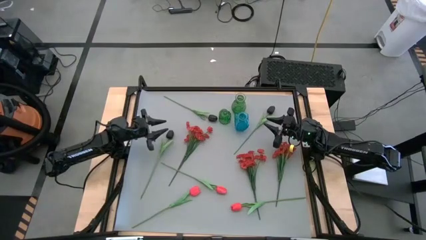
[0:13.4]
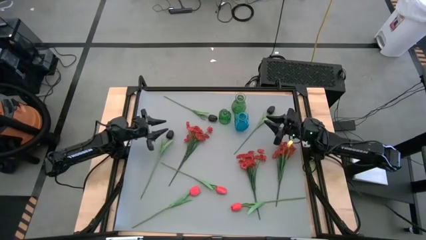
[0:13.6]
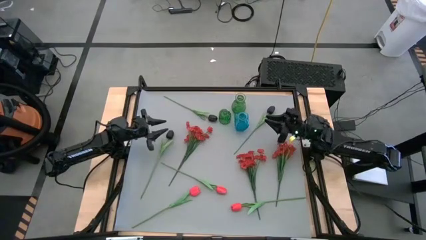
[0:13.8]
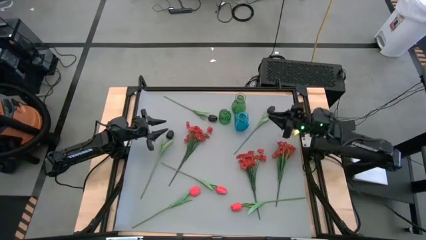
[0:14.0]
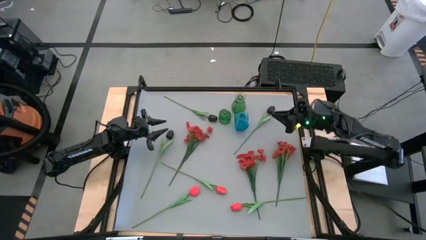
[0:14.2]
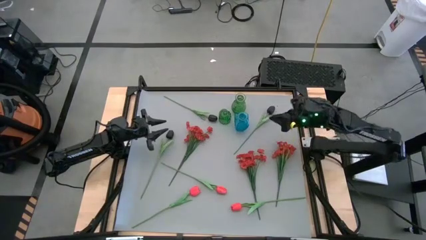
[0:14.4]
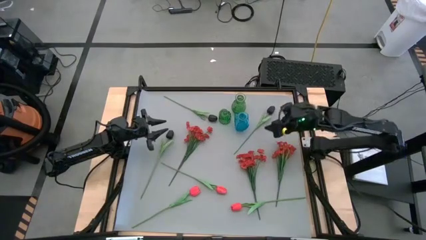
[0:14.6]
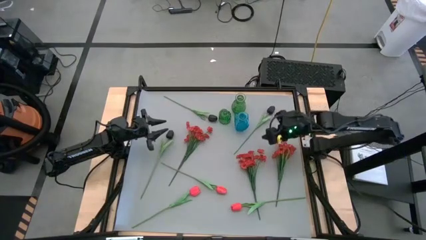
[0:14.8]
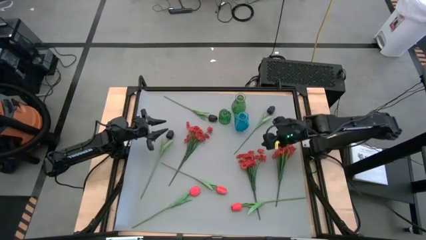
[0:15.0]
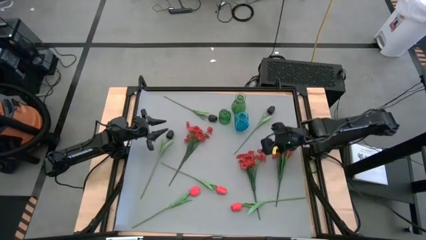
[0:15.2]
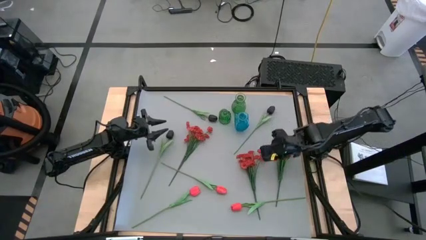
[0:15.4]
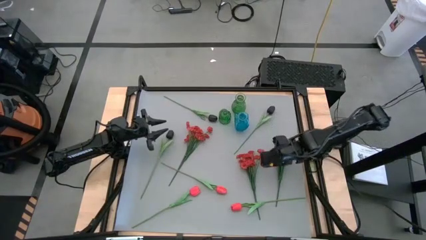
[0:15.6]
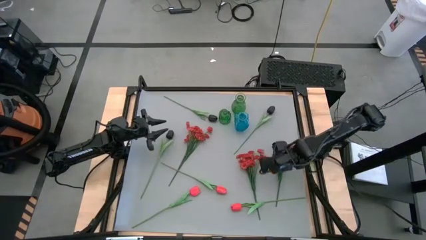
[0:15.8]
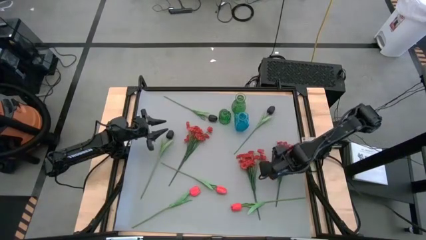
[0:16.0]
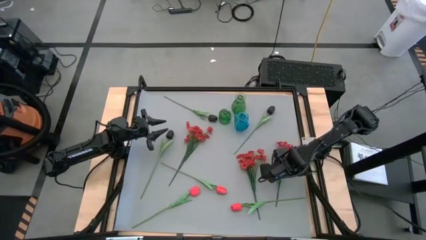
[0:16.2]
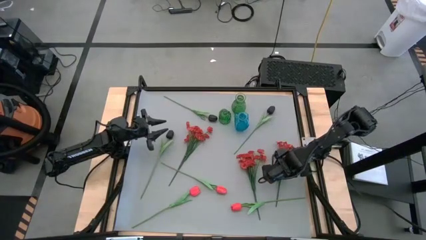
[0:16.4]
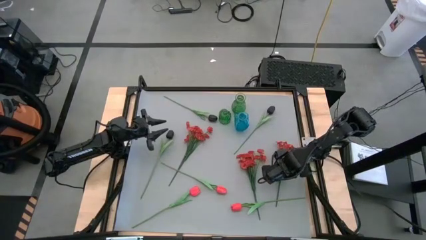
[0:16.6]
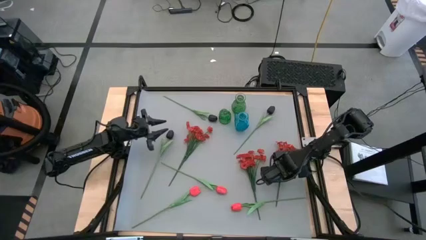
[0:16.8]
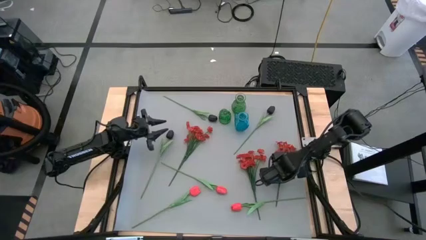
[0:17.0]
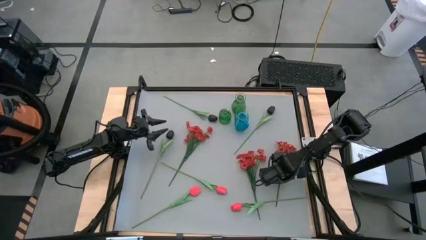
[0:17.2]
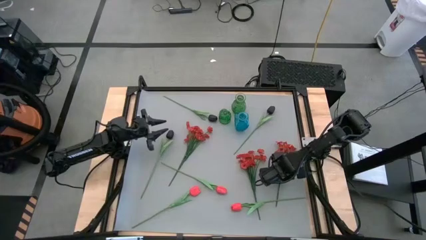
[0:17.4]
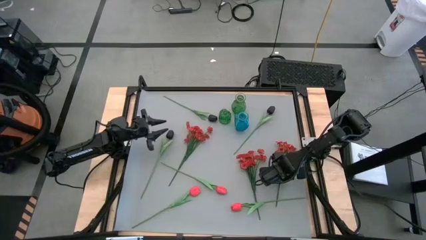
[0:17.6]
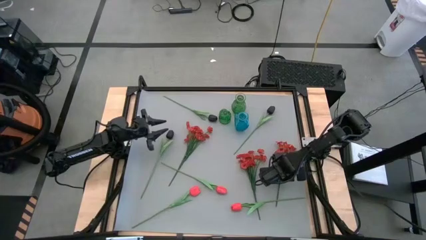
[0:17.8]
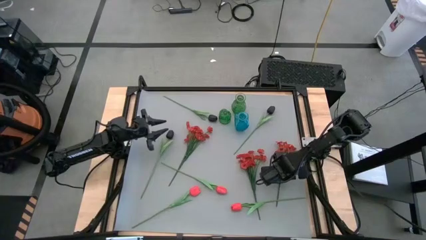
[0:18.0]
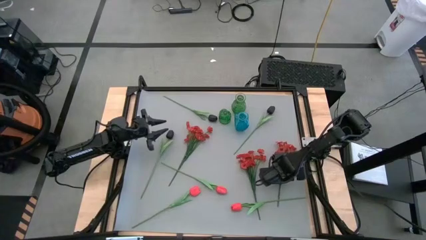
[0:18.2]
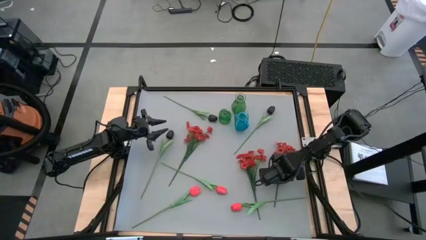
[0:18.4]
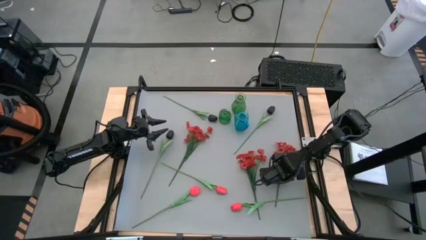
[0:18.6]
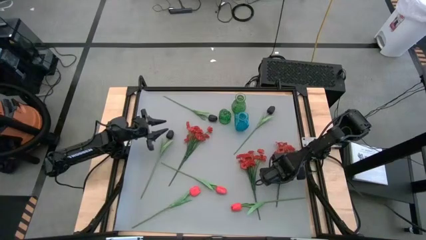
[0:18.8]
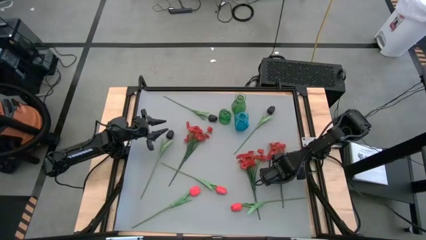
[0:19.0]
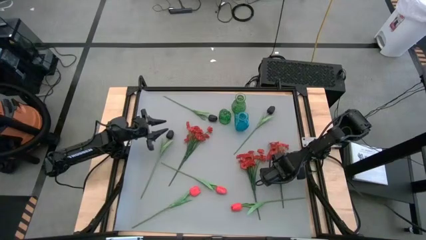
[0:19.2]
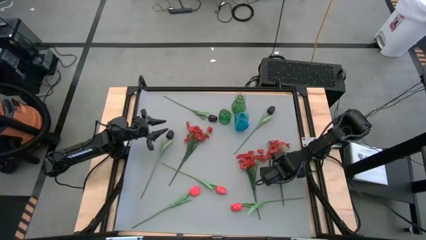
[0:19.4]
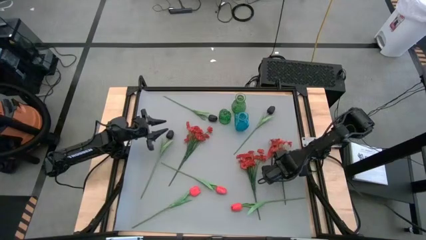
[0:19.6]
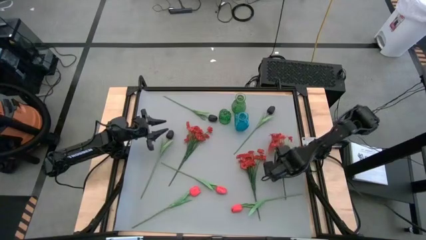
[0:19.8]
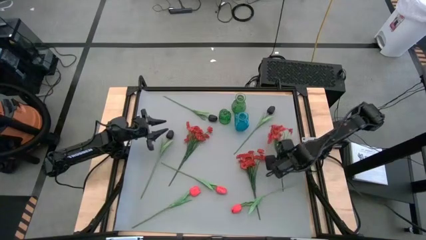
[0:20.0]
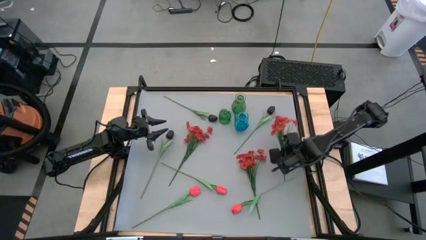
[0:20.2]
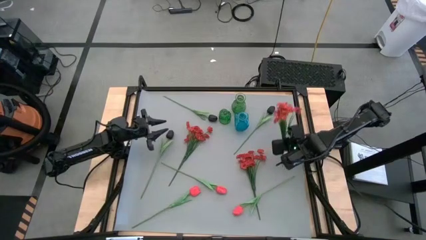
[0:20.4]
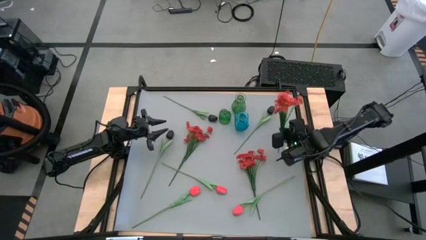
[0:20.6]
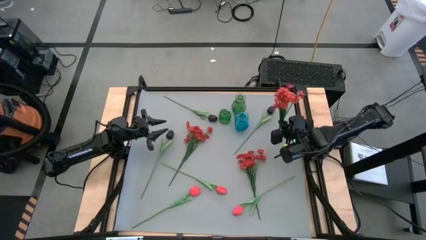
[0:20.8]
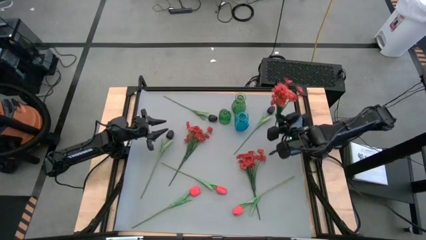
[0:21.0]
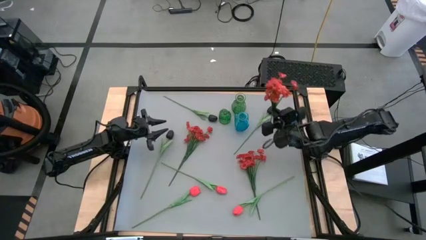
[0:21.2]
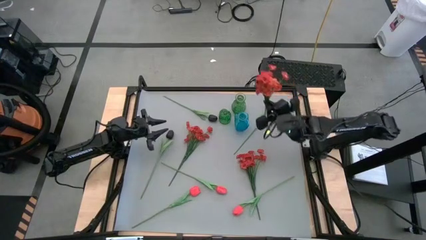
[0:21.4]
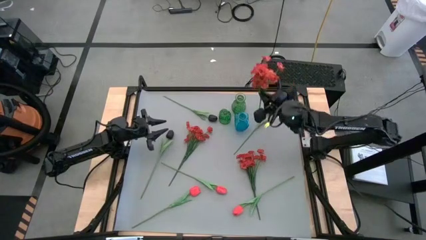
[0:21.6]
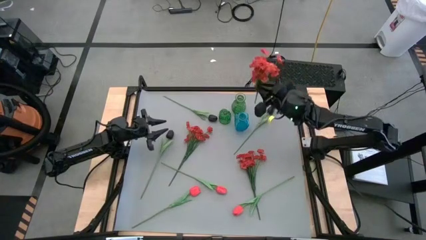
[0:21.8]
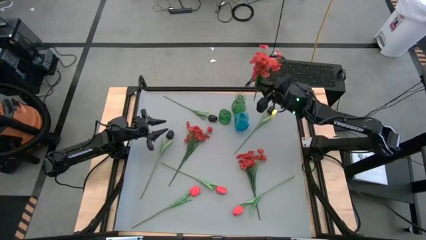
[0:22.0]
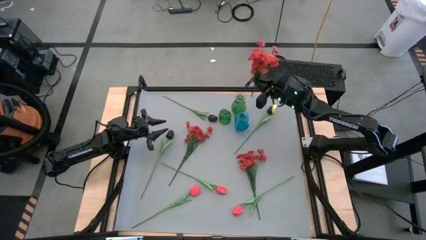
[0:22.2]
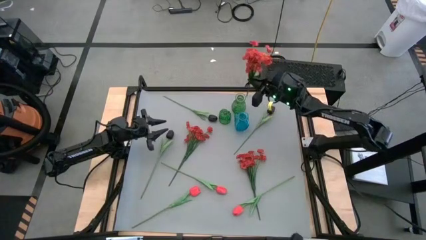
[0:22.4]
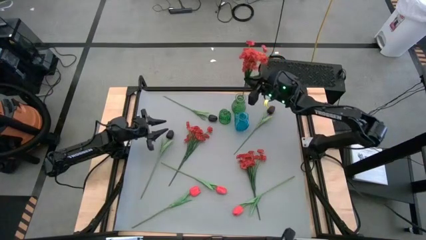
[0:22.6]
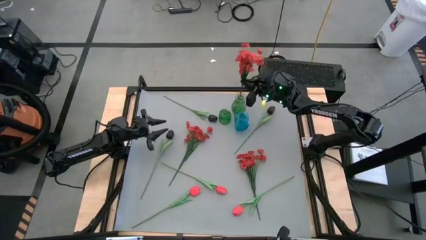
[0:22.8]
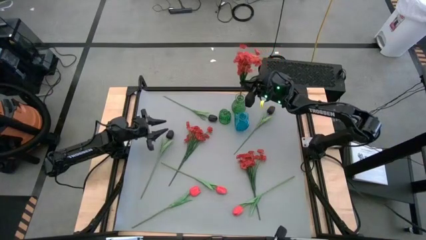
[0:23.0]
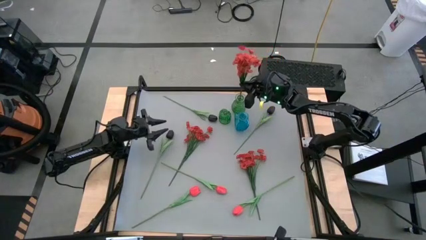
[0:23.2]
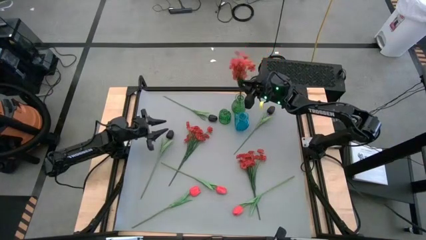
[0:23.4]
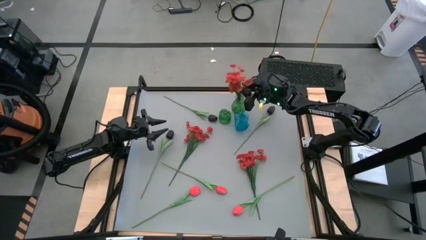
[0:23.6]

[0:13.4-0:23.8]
Task: Sort flowers into vase by color
Put the right red flowers into the top green vase

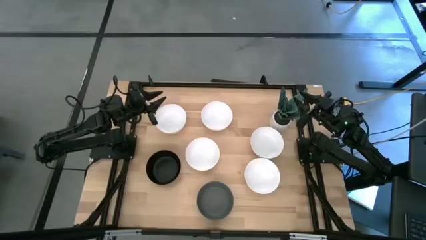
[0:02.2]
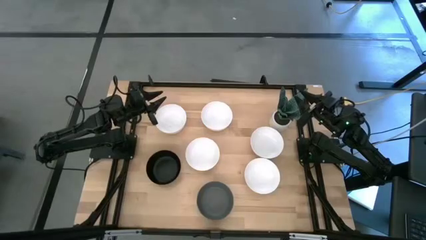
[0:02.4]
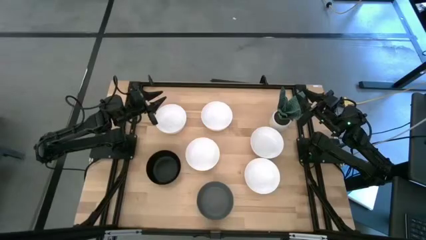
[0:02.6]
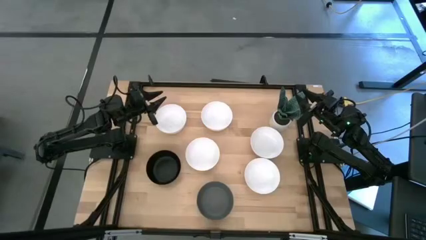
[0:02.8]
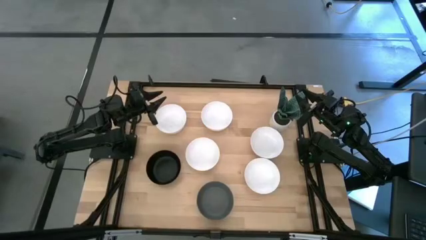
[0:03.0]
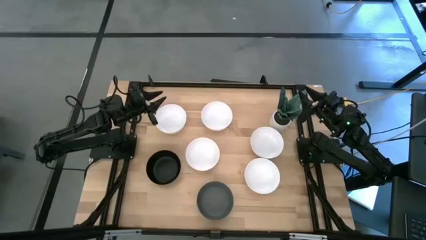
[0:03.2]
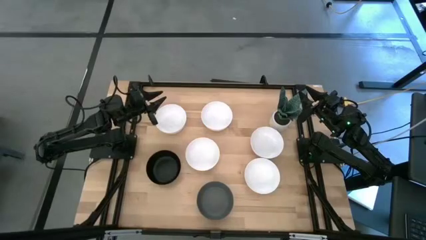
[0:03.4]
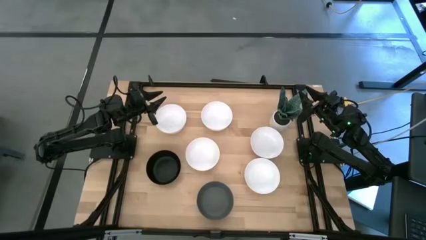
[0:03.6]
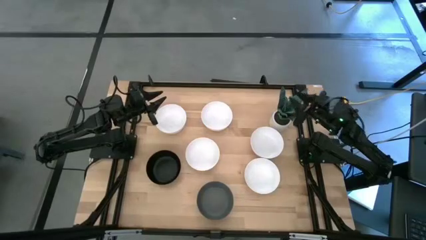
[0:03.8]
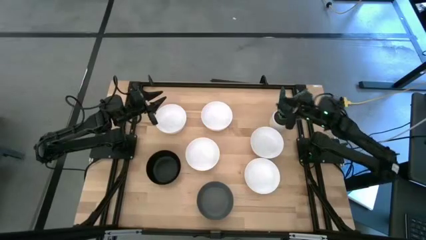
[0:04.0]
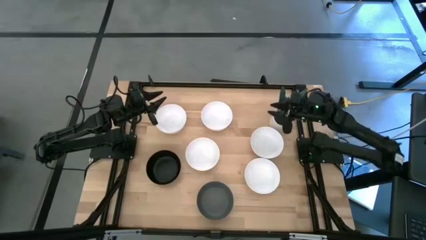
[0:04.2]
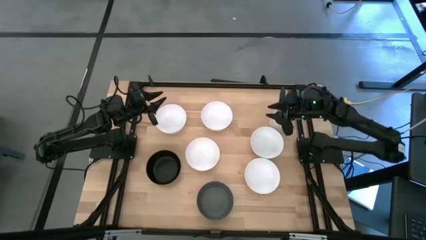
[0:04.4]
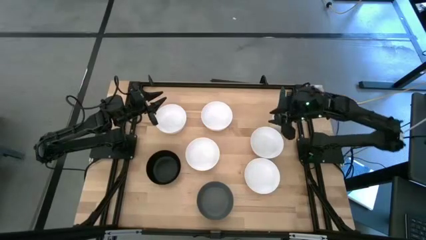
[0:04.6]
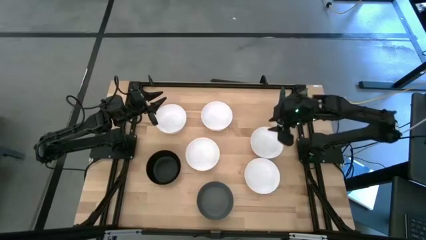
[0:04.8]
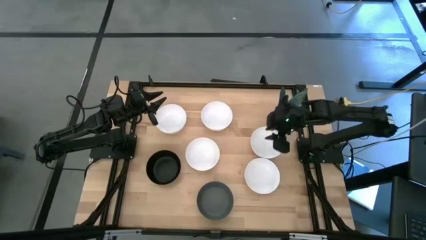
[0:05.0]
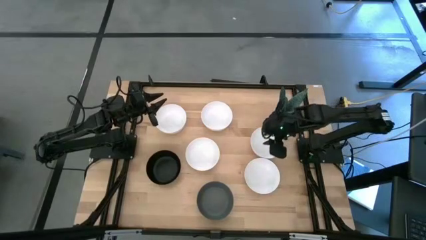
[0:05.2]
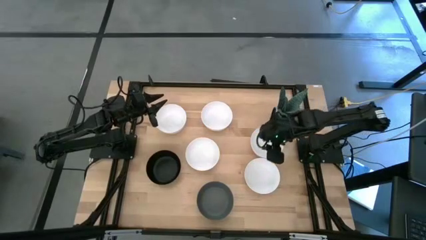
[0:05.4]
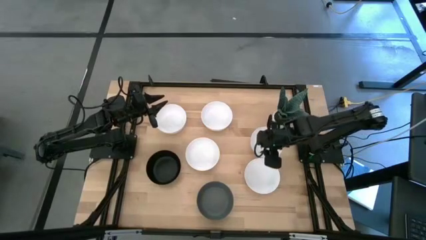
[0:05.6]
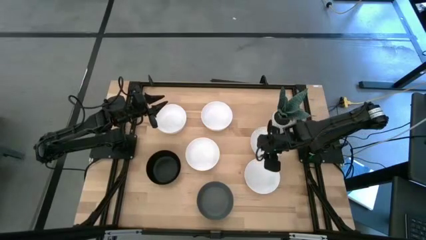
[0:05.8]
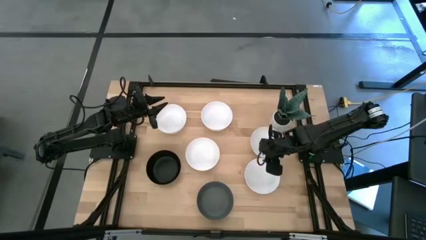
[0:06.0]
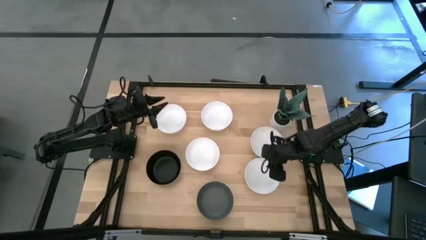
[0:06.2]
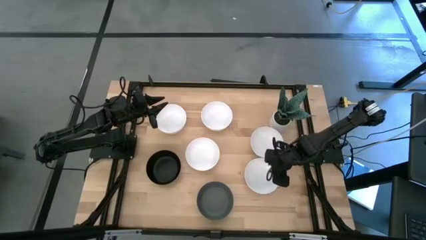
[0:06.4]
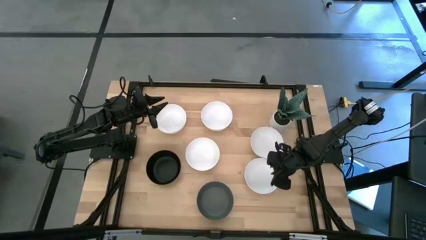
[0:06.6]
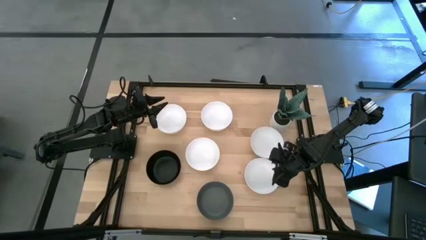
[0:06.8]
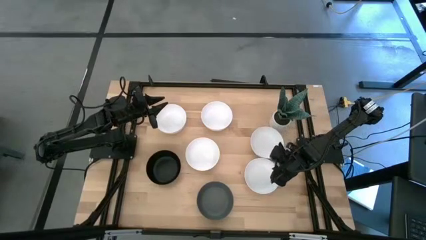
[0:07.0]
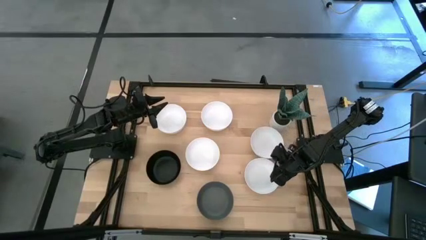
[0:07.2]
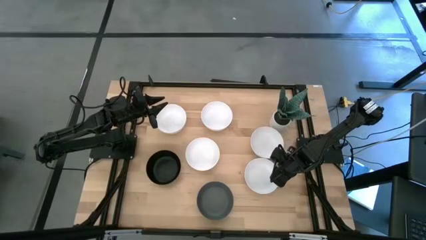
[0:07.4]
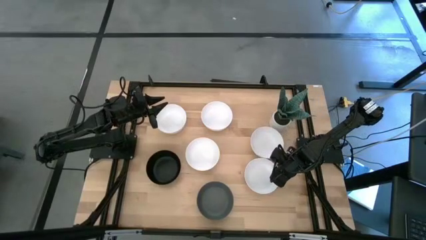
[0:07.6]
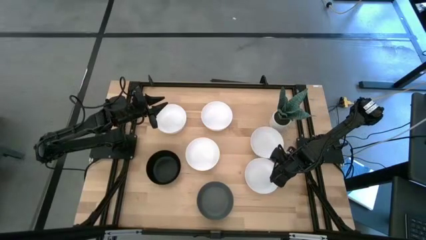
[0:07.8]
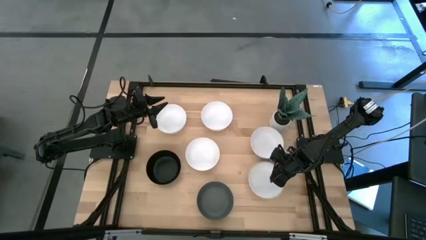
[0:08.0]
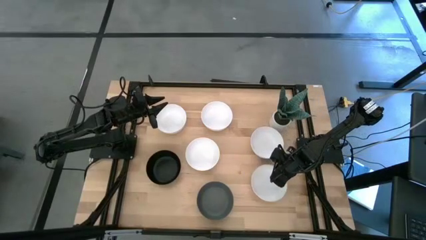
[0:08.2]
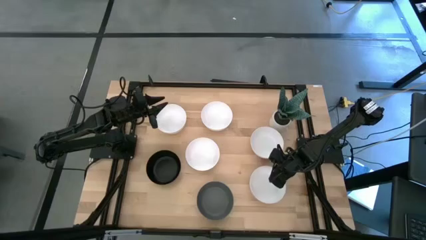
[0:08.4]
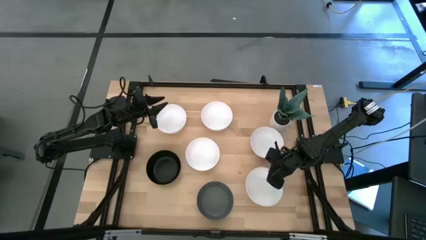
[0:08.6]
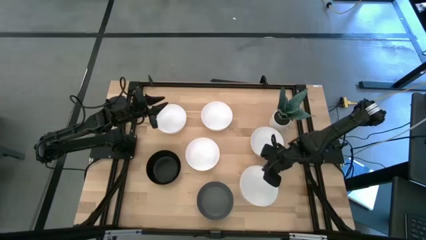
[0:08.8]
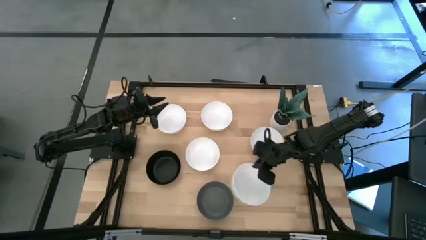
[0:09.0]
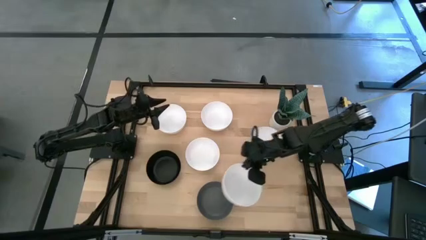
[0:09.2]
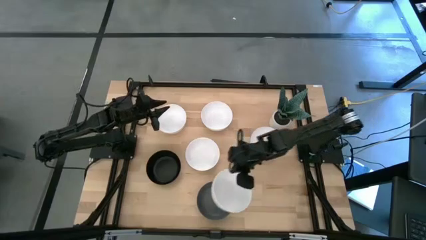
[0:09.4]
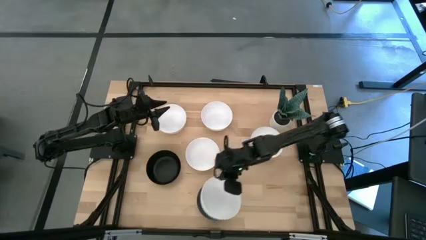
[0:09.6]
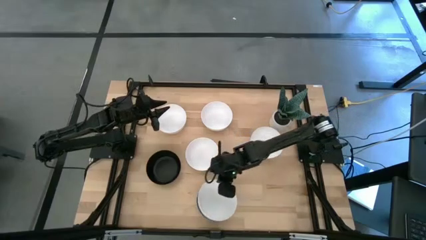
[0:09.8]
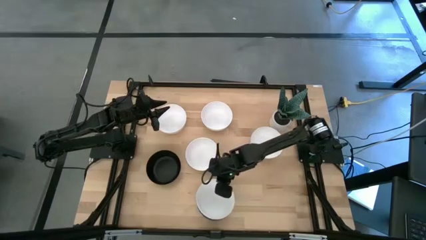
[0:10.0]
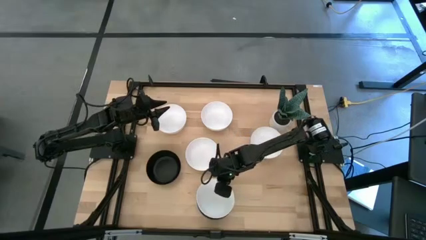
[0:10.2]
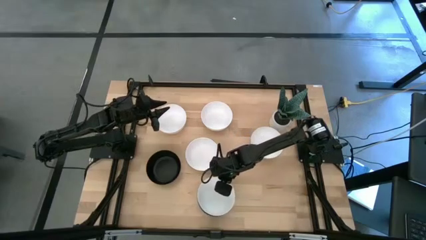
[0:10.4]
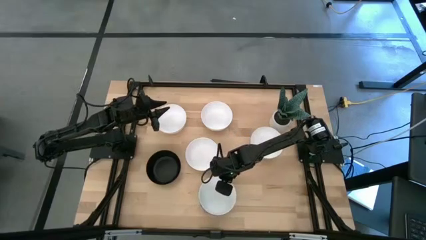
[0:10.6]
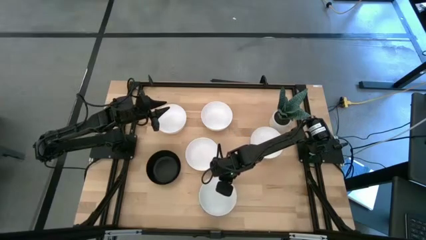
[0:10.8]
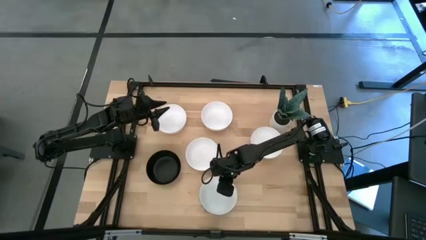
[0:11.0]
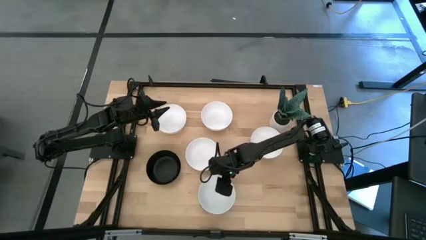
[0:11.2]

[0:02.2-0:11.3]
Task: Nest bowls inside each other
Stack the white bowl on top of the gray bowl
